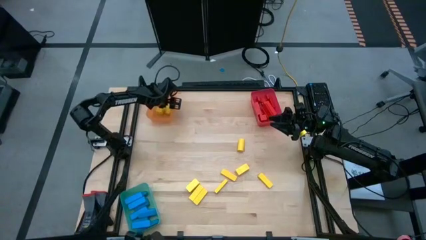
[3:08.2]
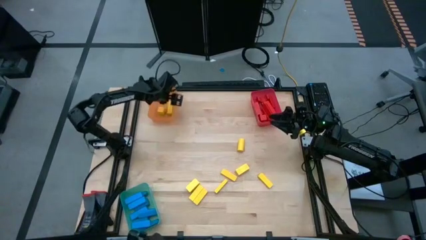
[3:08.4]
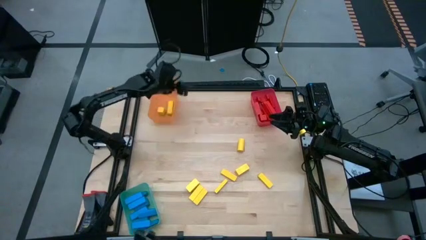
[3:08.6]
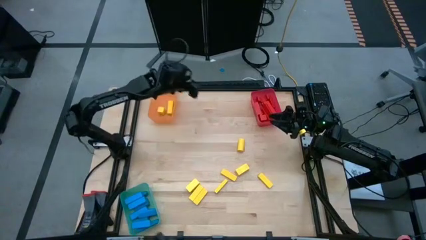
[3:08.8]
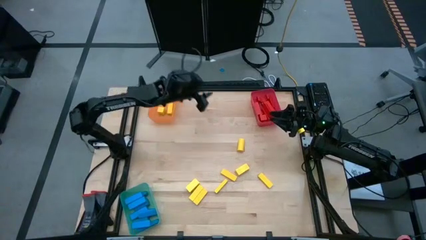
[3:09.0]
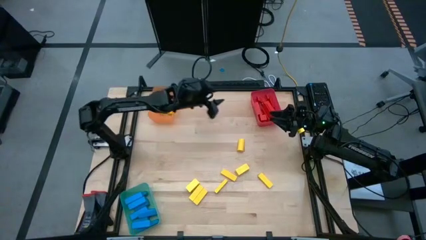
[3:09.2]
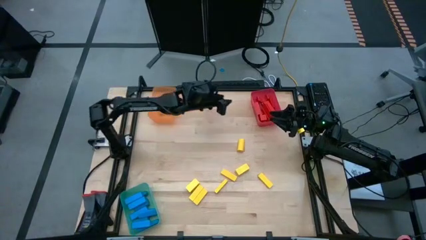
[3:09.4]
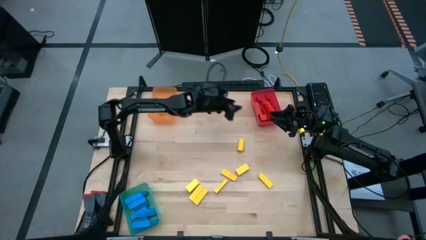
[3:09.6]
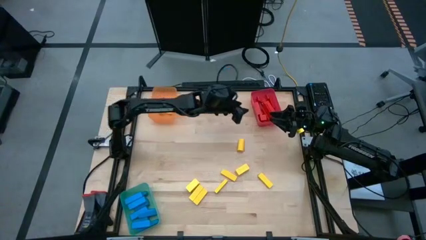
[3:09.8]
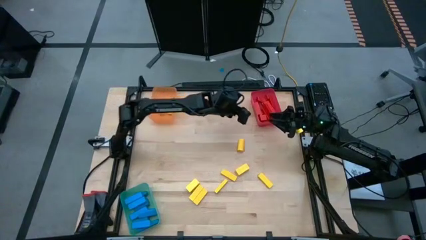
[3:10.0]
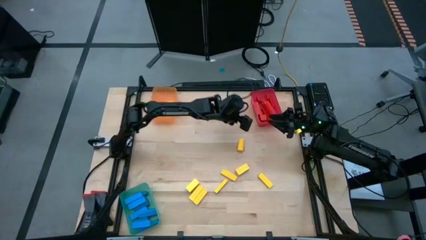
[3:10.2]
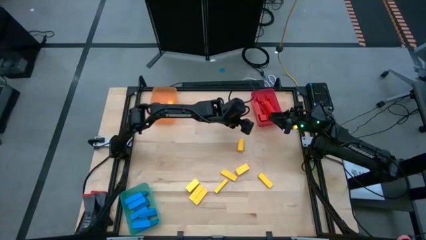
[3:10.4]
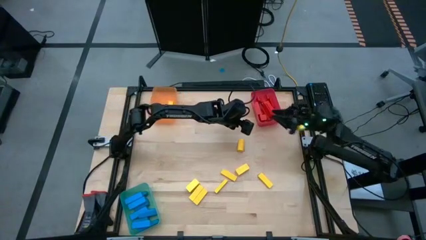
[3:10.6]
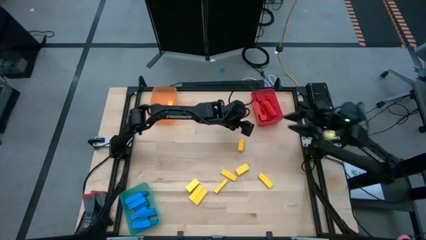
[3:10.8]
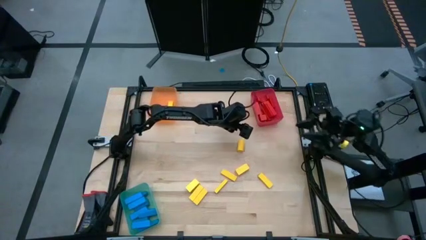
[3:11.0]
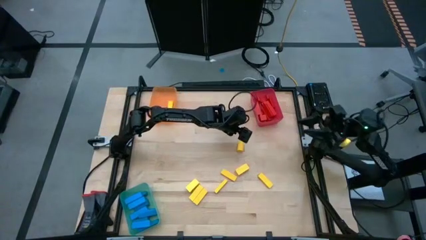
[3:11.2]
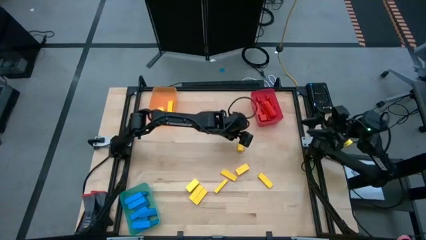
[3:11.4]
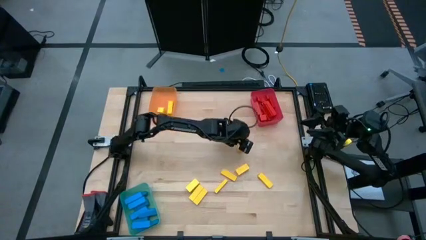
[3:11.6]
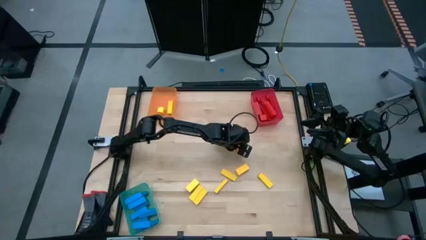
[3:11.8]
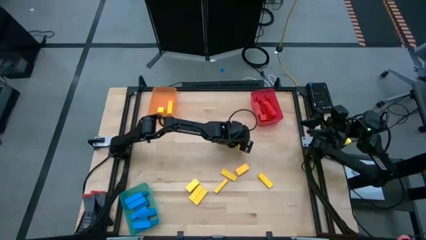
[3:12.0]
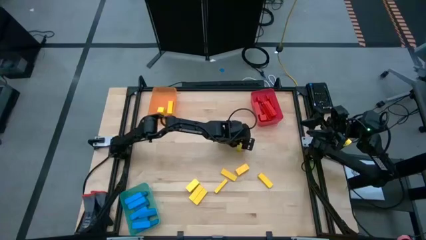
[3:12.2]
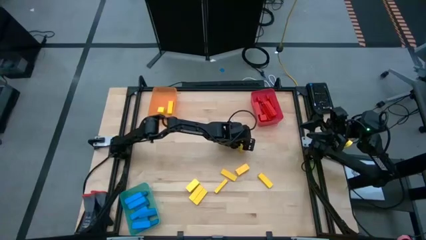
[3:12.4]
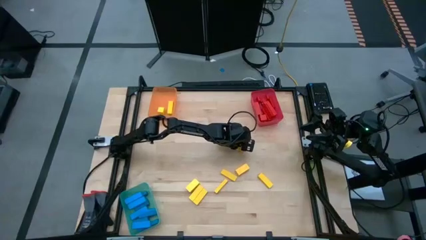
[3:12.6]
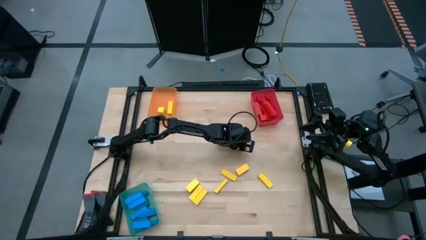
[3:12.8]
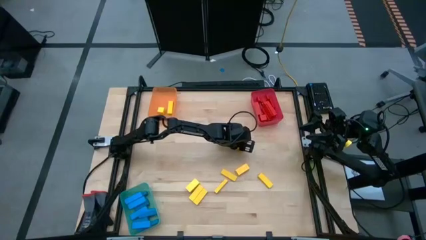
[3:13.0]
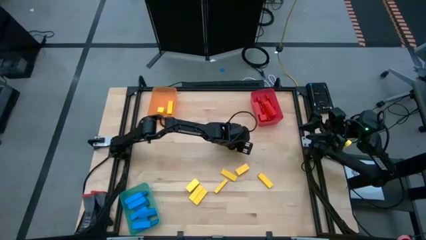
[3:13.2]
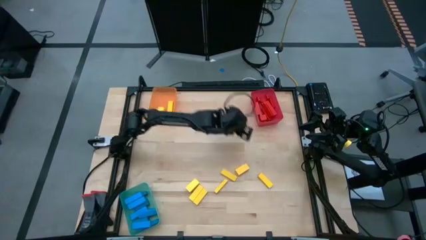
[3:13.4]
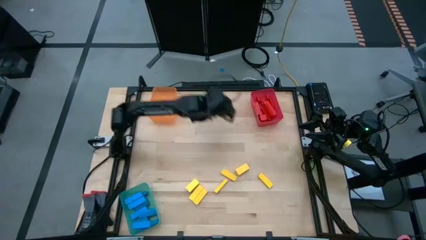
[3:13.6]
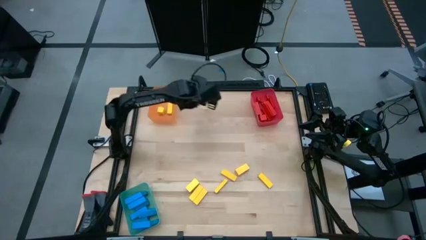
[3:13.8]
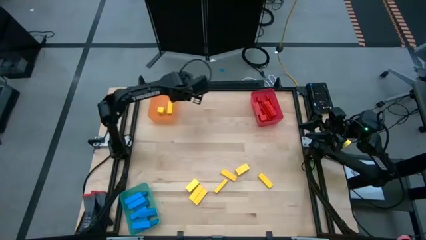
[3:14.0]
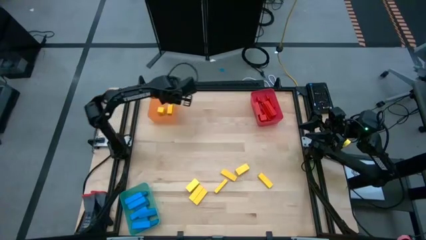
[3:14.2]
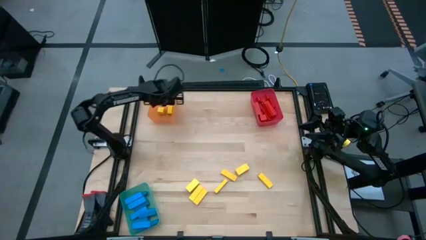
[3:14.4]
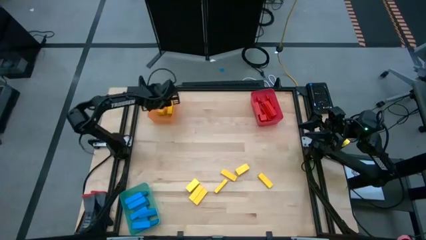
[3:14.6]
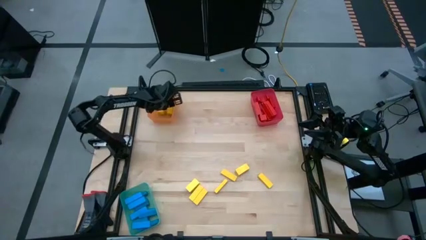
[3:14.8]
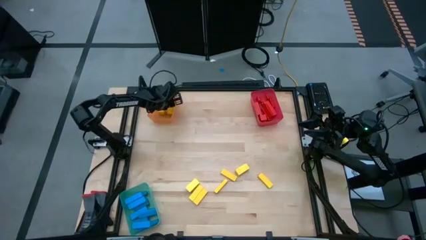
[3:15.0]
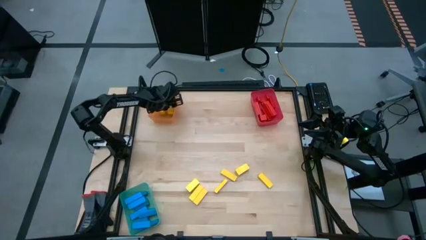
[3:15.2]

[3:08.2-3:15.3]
Task: Sort blocks
Put the yellow block into the orange transparent bin

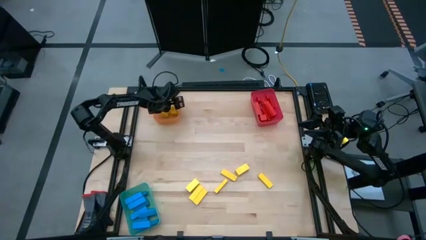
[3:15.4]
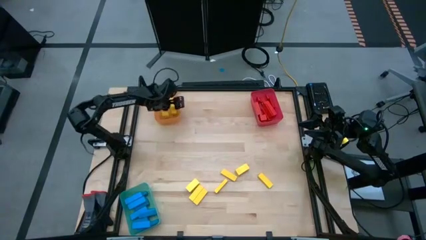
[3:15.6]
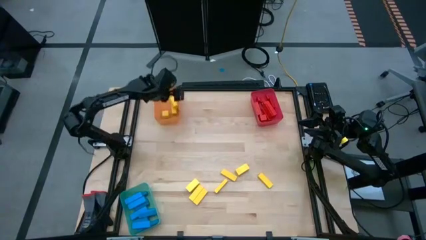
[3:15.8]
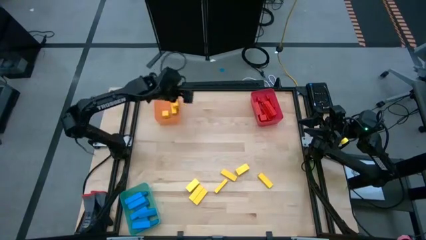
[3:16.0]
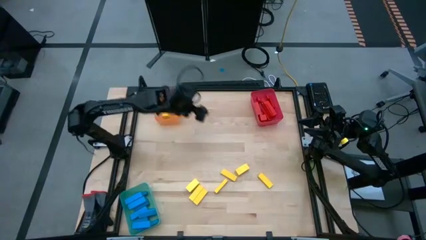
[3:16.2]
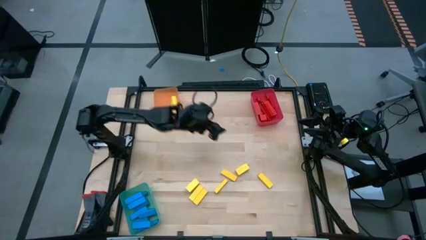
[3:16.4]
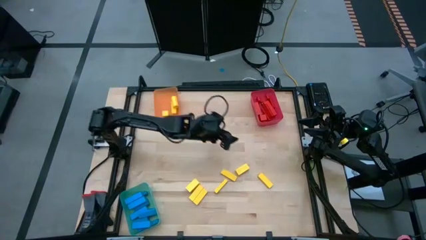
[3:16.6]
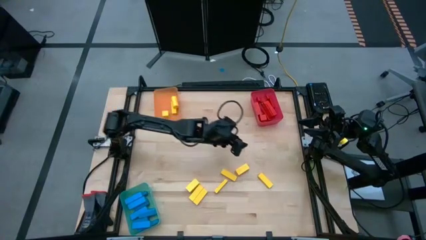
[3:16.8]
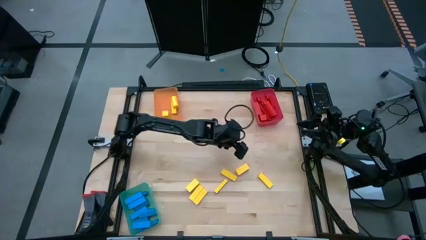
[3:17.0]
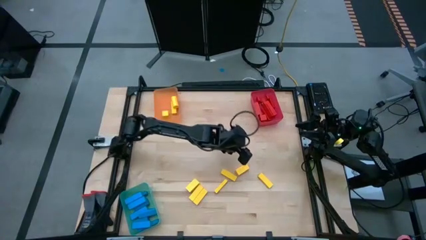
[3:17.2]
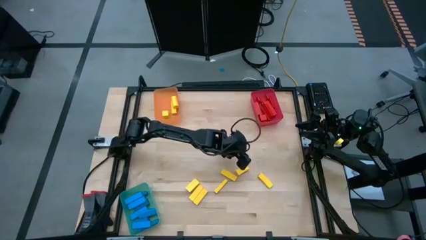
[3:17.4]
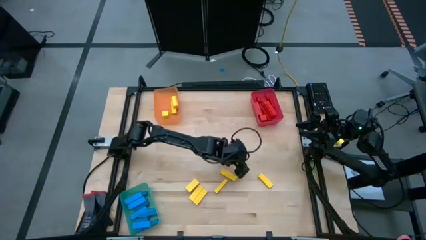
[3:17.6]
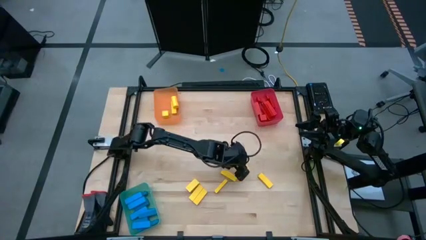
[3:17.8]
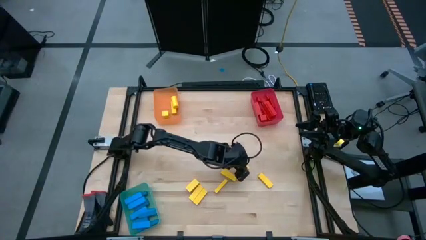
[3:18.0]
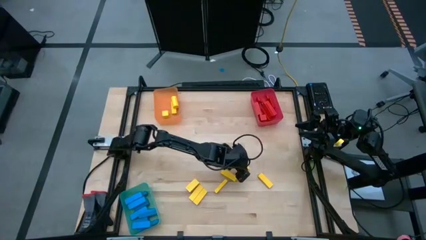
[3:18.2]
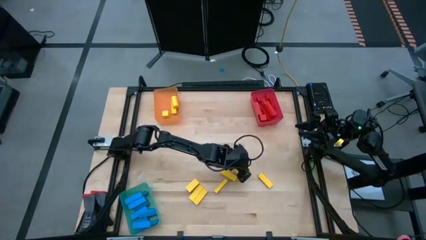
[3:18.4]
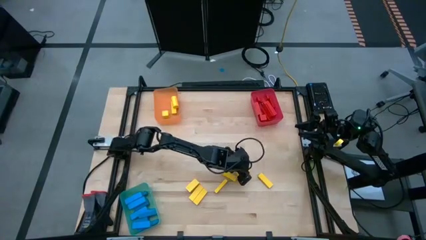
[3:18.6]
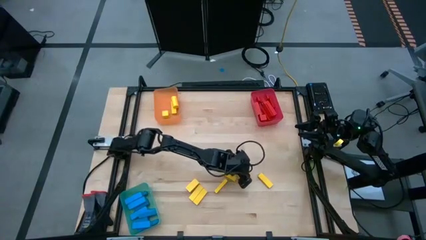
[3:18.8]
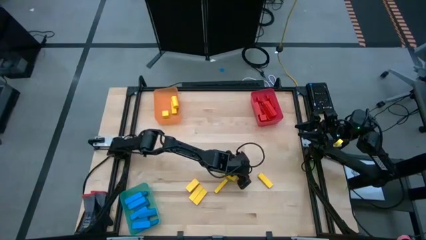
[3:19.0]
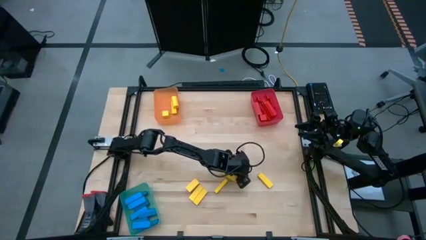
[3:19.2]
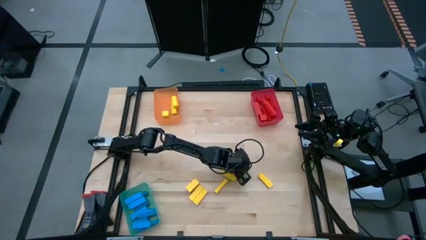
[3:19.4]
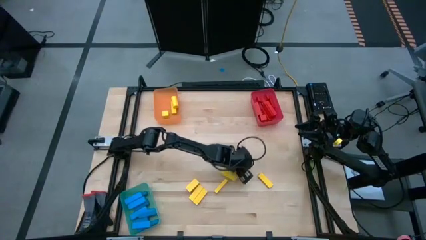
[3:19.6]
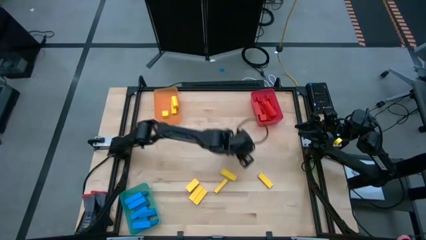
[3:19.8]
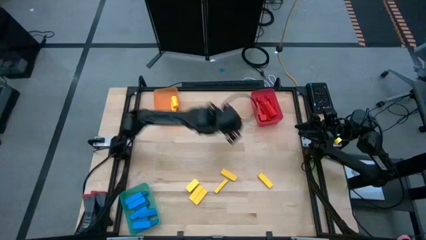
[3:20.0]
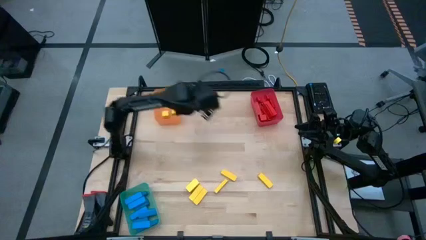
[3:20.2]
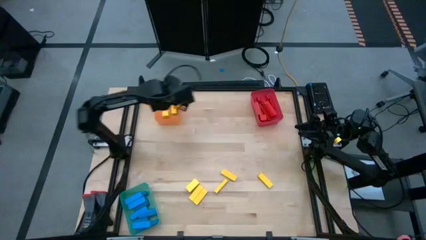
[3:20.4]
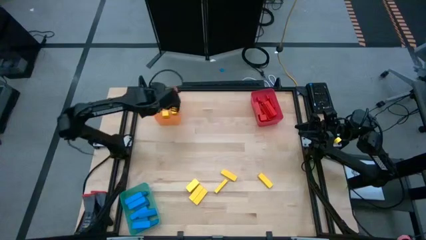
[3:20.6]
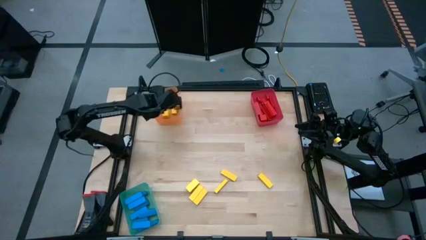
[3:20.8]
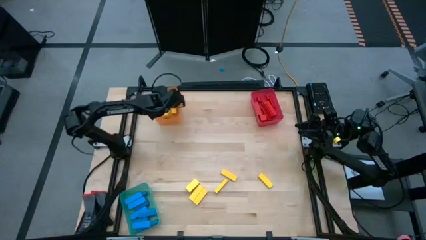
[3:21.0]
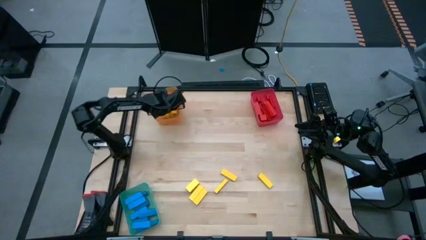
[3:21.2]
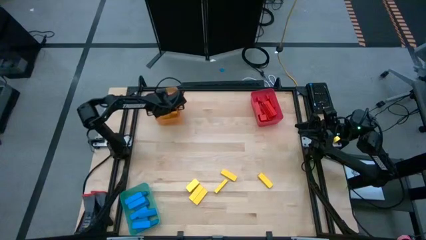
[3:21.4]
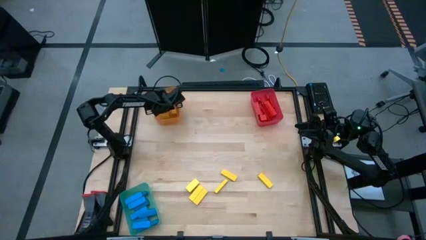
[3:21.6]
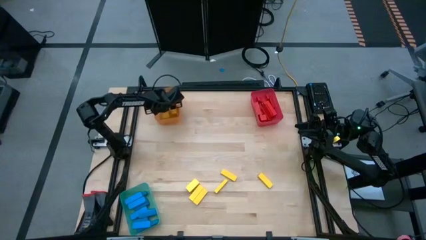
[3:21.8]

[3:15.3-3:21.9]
Put the yellow block into the orange transparent bin

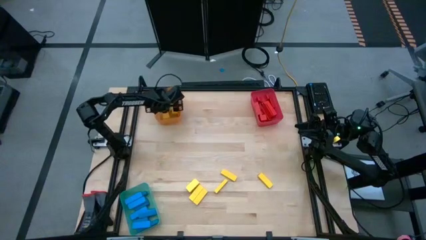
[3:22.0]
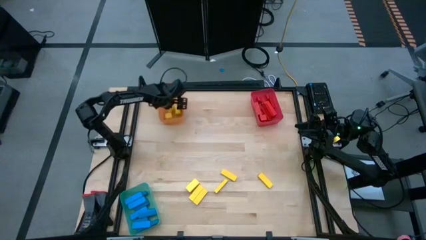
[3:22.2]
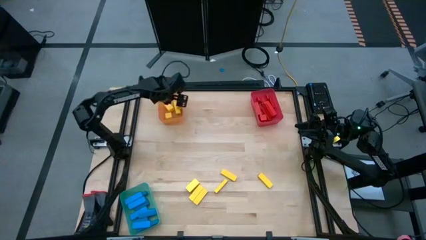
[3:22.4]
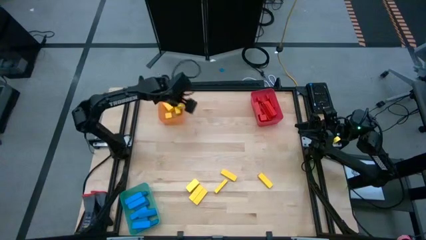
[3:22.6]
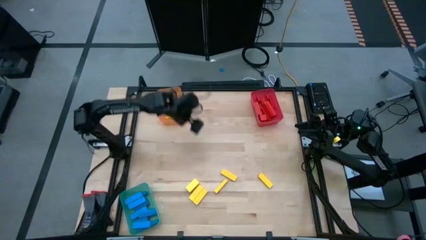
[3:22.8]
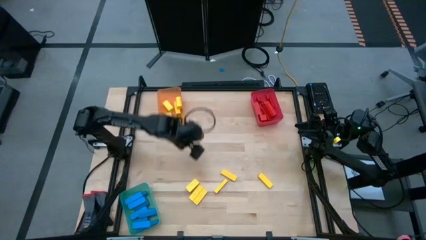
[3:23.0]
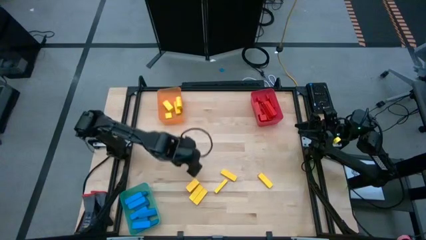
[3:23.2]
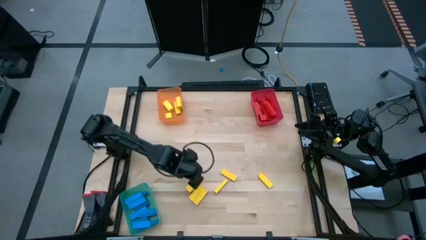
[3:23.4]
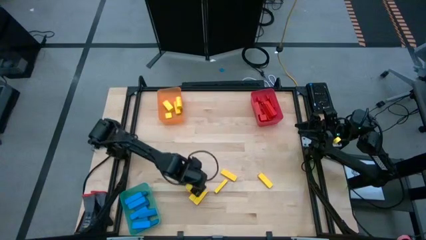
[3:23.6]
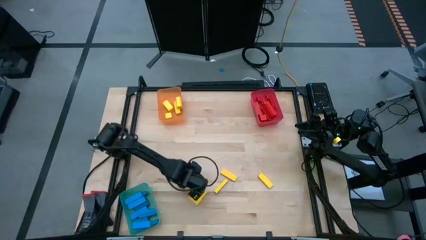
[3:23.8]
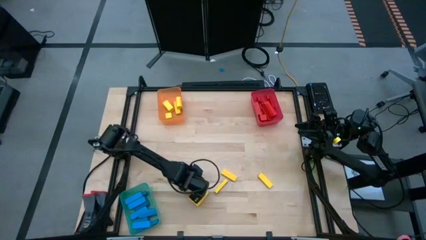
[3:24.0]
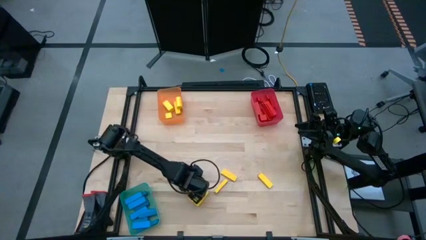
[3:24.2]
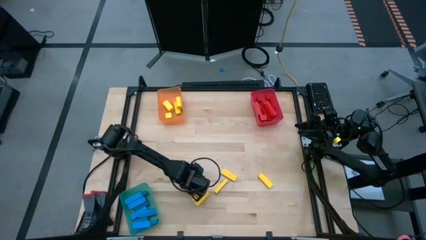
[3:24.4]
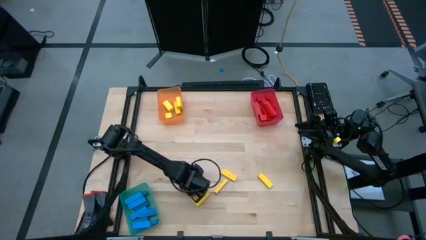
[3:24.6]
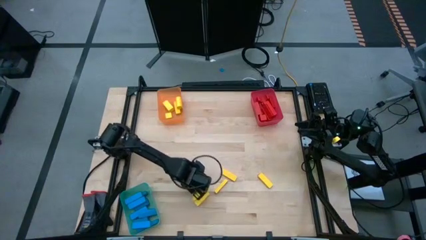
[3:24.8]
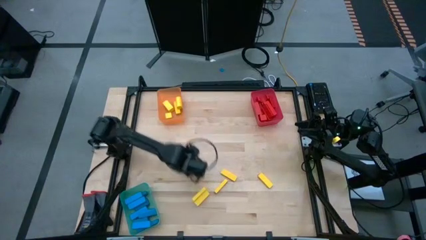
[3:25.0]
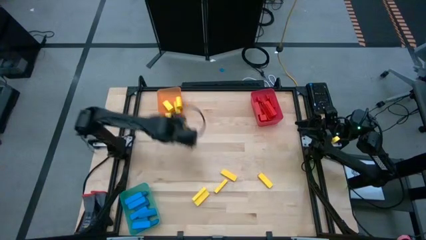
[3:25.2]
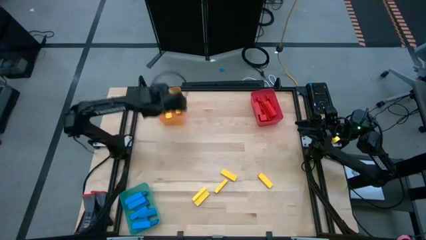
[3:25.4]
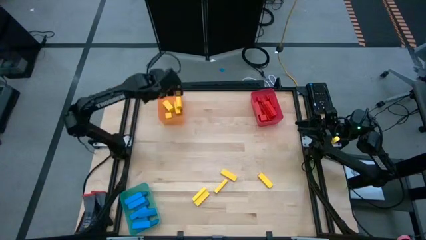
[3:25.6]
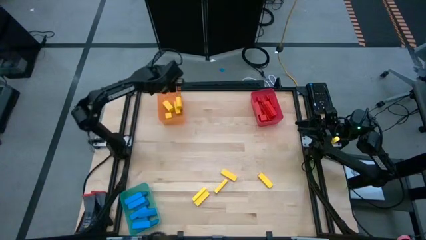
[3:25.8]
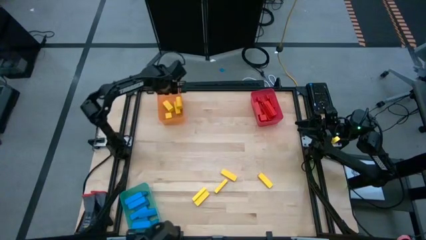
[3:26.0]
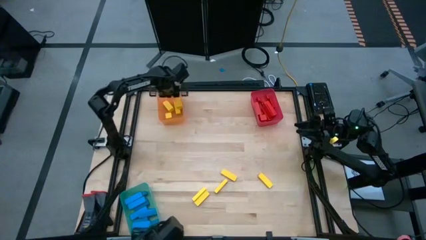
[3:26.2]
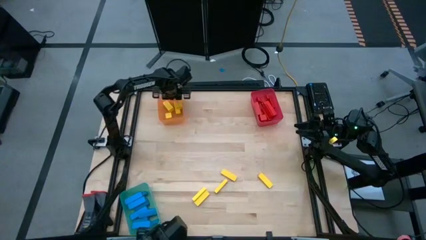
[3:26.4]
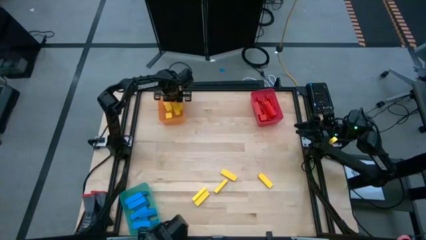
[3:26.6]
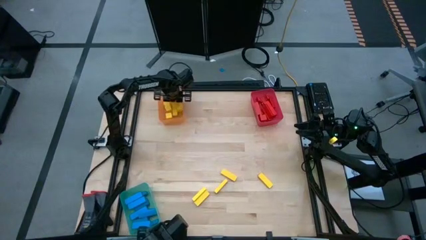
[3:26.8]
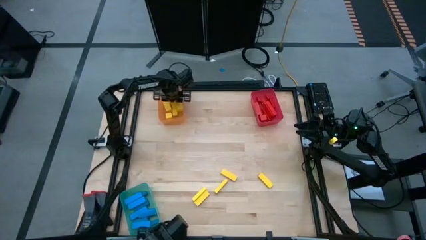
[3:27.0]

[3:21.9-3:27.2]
Put the yellow block into the orange transparent bin
